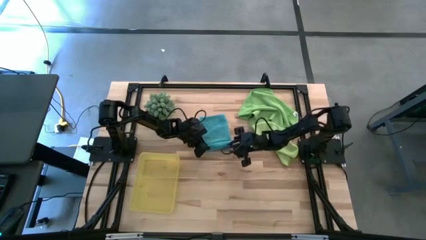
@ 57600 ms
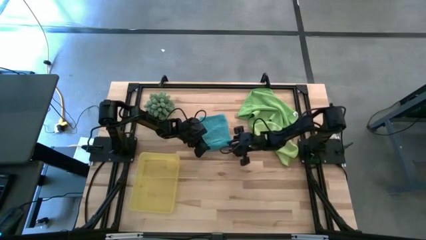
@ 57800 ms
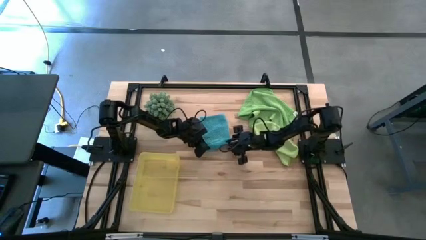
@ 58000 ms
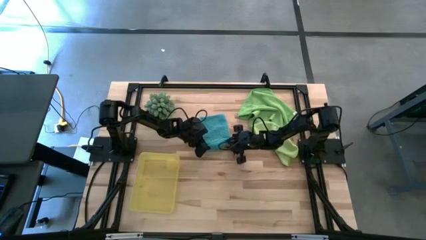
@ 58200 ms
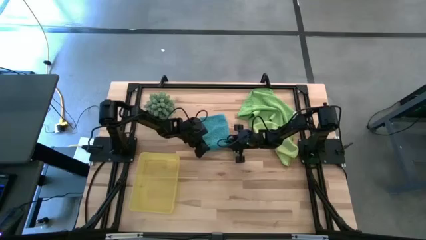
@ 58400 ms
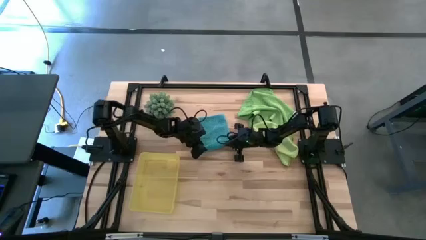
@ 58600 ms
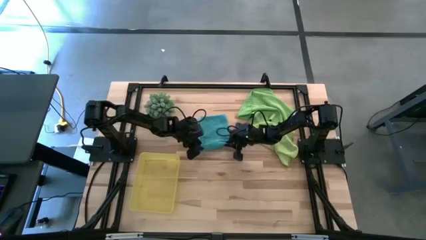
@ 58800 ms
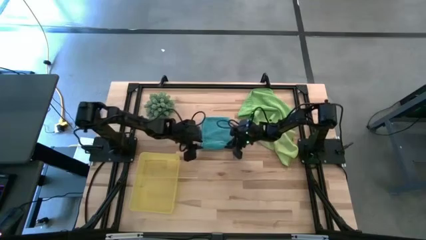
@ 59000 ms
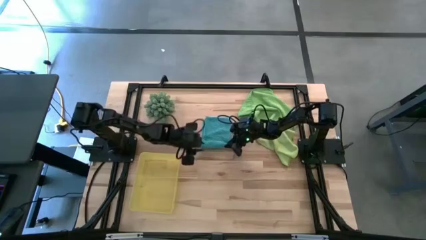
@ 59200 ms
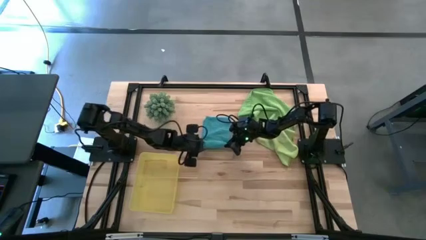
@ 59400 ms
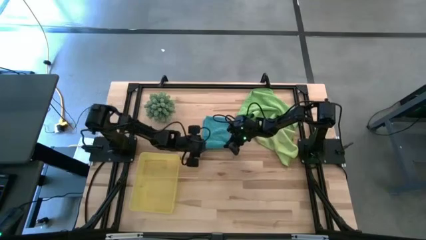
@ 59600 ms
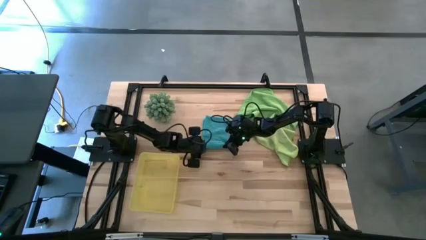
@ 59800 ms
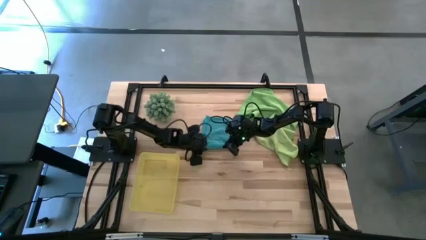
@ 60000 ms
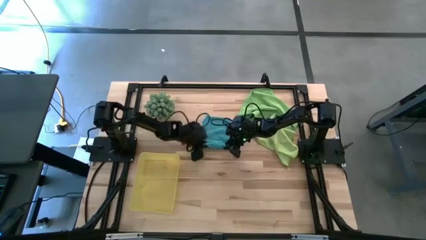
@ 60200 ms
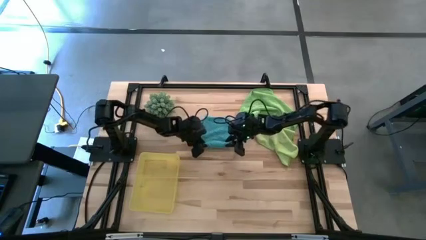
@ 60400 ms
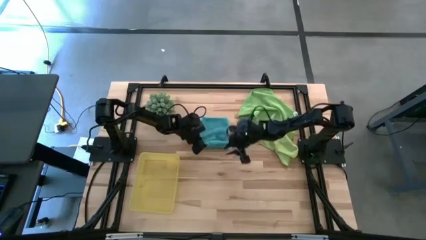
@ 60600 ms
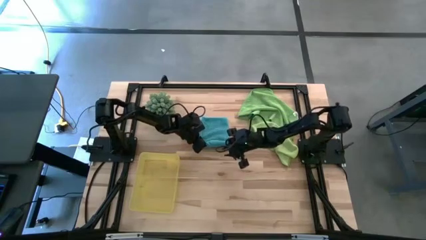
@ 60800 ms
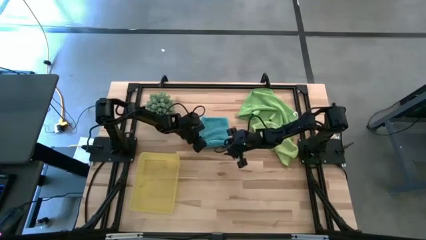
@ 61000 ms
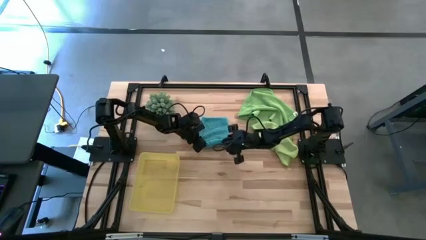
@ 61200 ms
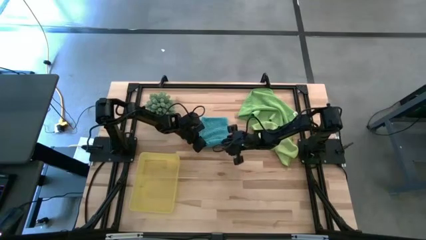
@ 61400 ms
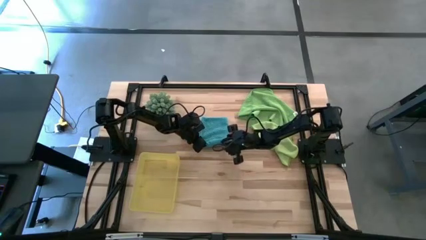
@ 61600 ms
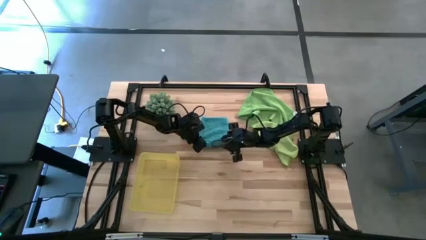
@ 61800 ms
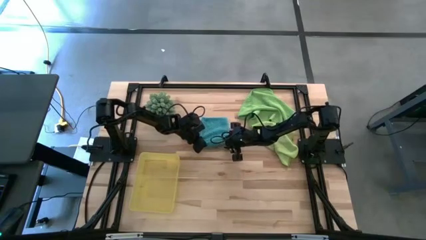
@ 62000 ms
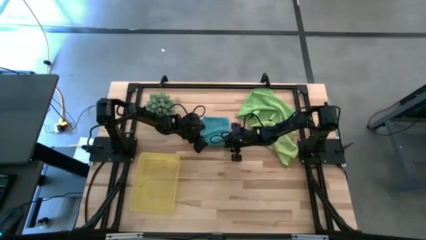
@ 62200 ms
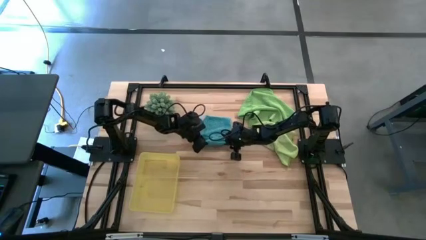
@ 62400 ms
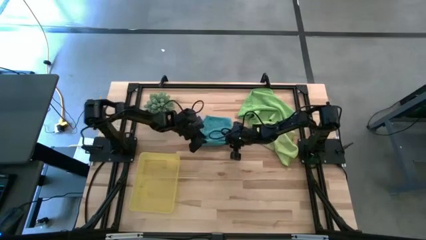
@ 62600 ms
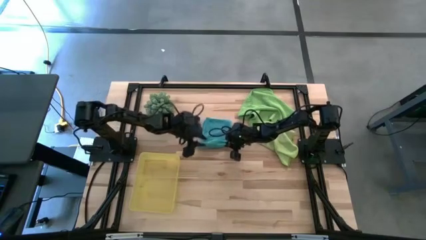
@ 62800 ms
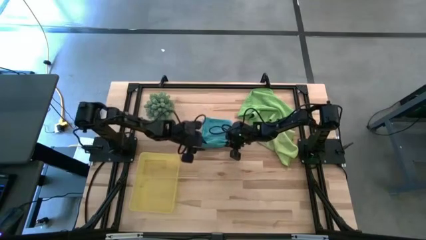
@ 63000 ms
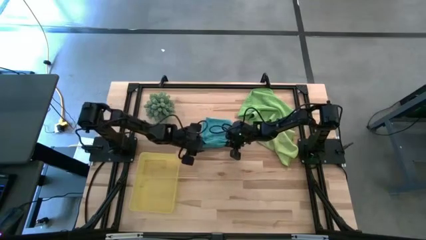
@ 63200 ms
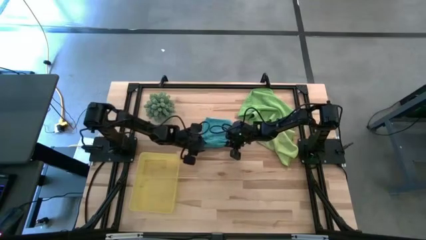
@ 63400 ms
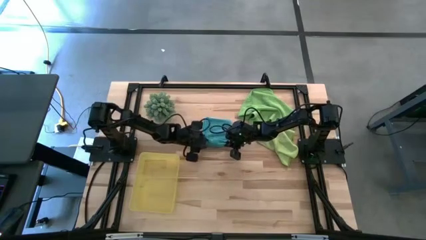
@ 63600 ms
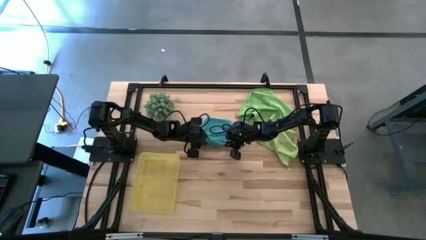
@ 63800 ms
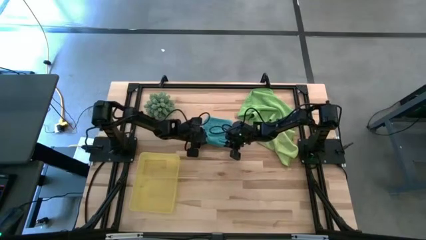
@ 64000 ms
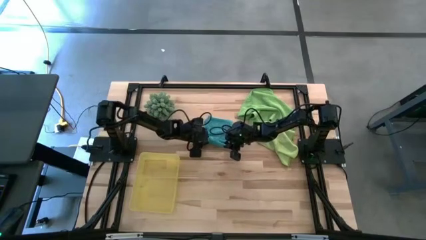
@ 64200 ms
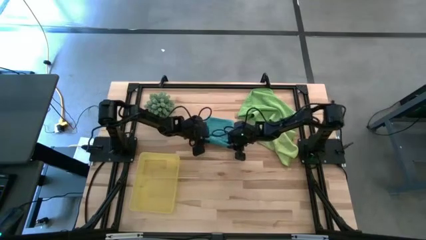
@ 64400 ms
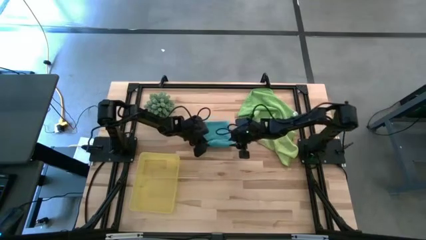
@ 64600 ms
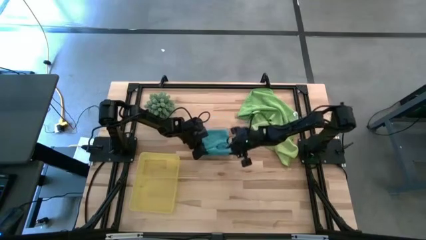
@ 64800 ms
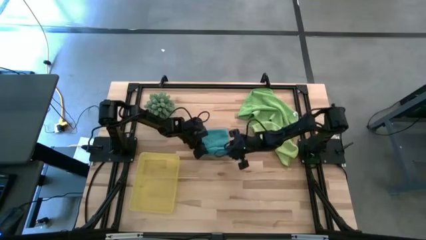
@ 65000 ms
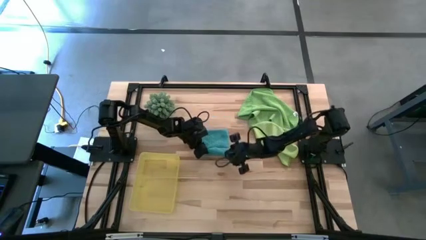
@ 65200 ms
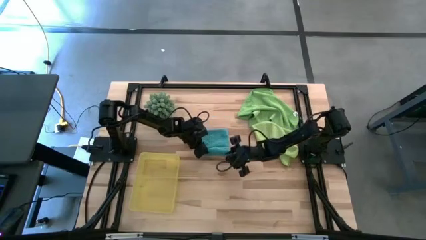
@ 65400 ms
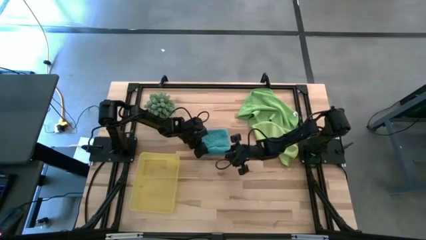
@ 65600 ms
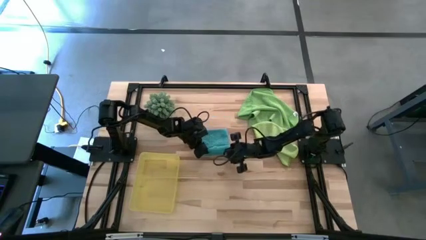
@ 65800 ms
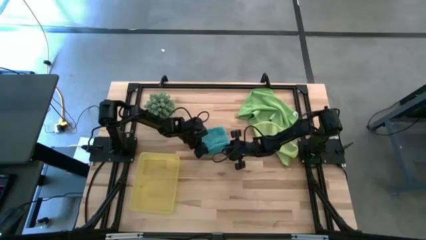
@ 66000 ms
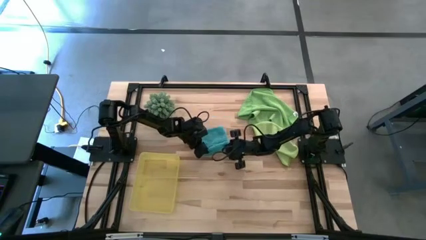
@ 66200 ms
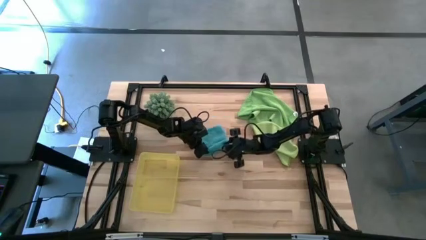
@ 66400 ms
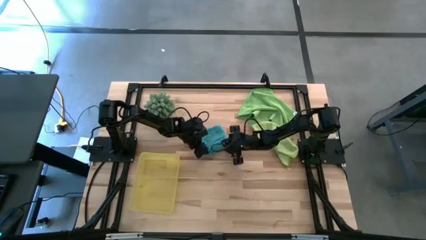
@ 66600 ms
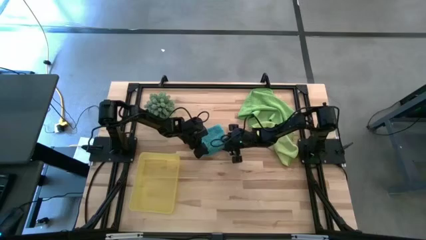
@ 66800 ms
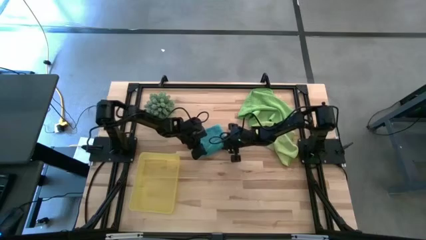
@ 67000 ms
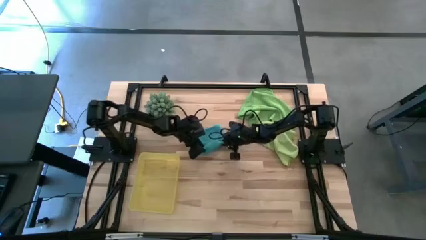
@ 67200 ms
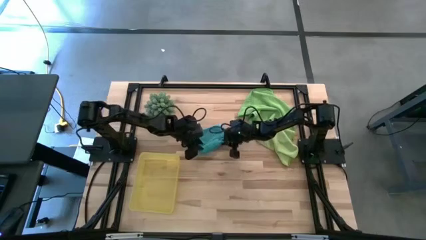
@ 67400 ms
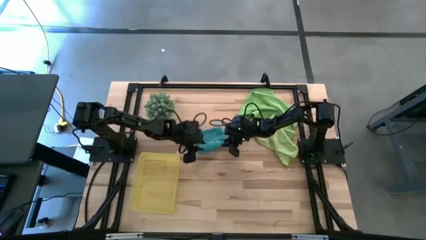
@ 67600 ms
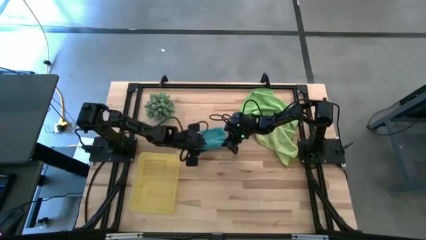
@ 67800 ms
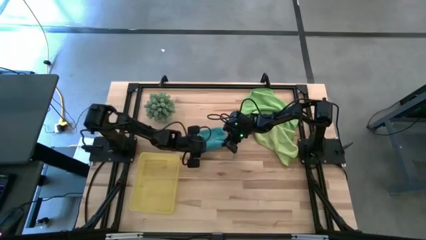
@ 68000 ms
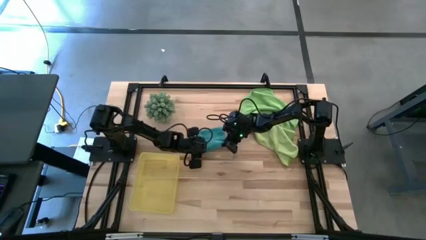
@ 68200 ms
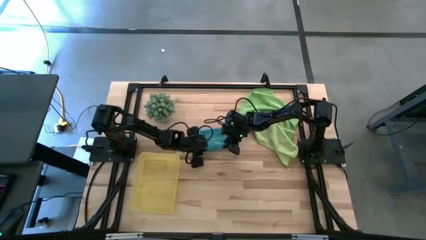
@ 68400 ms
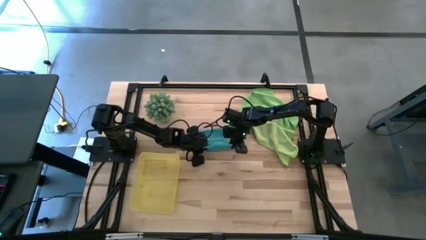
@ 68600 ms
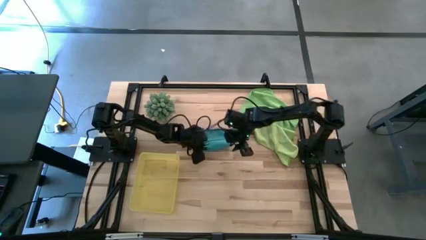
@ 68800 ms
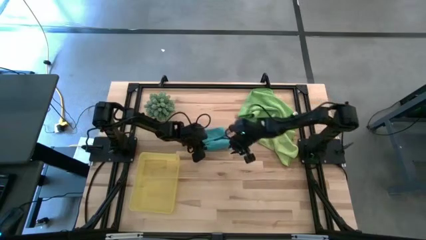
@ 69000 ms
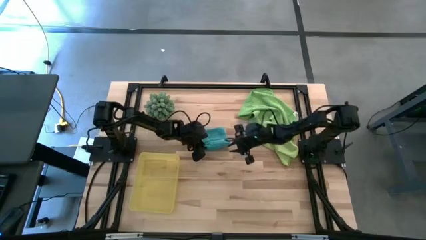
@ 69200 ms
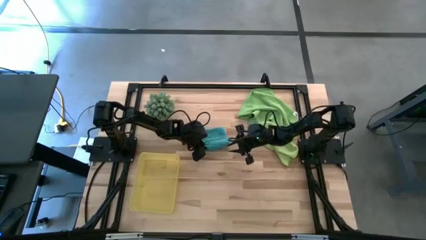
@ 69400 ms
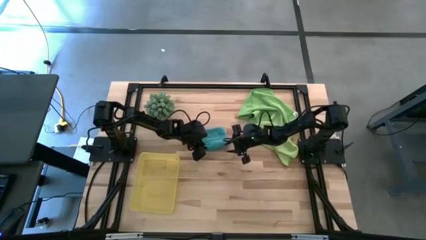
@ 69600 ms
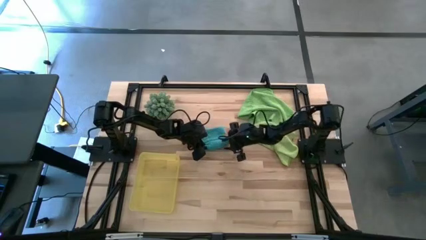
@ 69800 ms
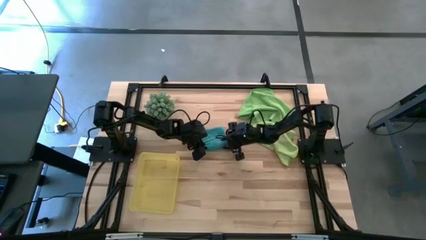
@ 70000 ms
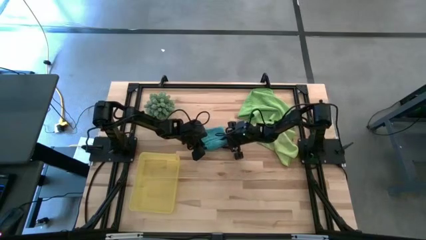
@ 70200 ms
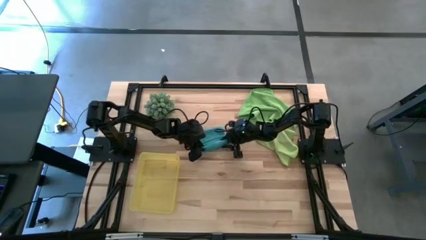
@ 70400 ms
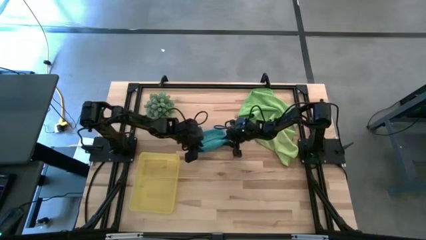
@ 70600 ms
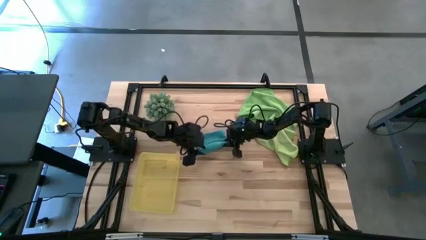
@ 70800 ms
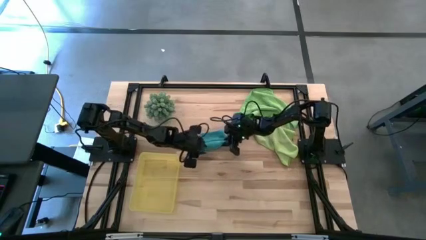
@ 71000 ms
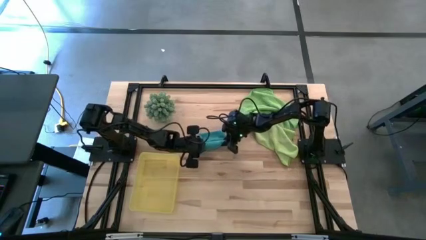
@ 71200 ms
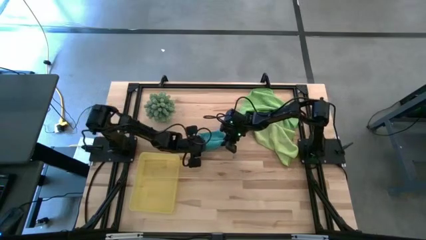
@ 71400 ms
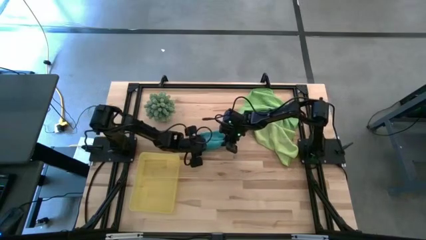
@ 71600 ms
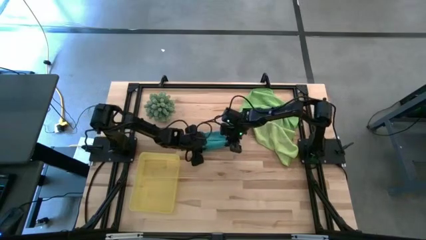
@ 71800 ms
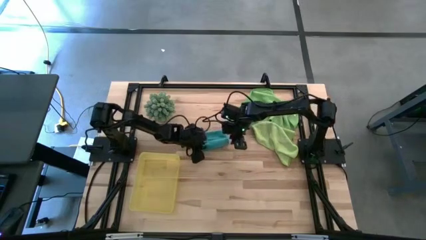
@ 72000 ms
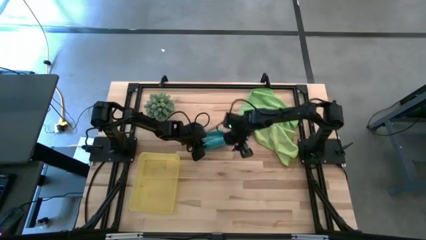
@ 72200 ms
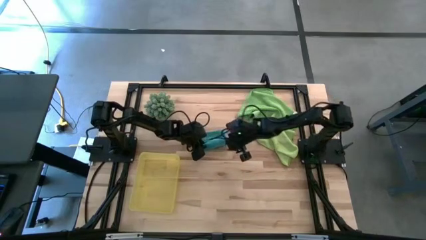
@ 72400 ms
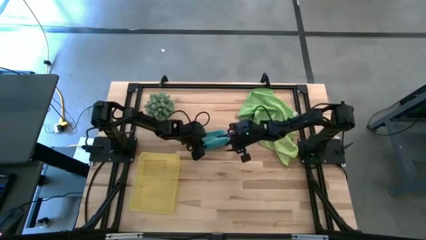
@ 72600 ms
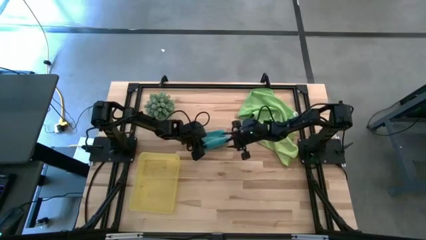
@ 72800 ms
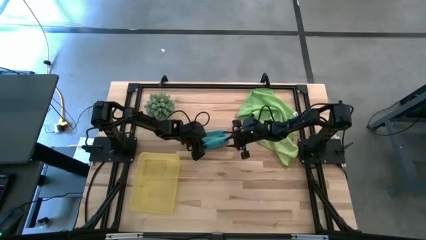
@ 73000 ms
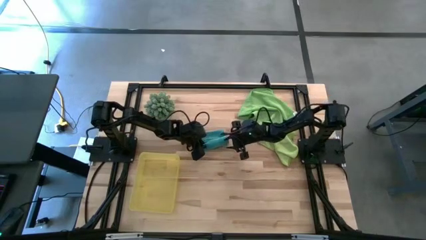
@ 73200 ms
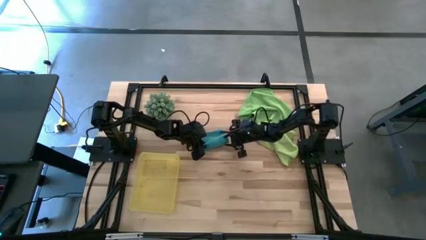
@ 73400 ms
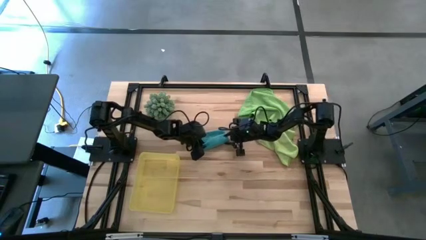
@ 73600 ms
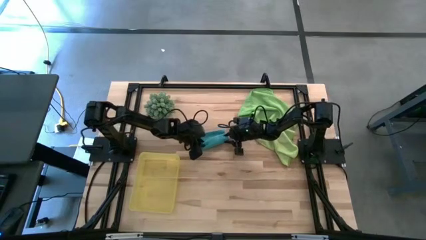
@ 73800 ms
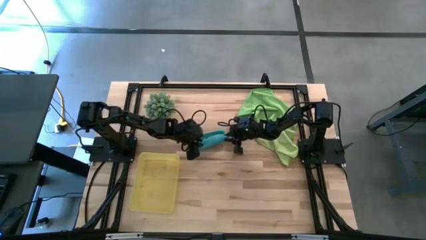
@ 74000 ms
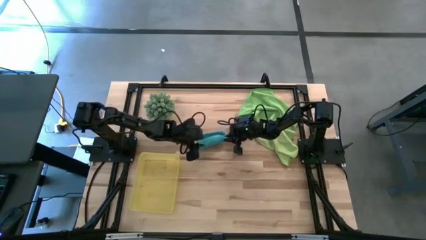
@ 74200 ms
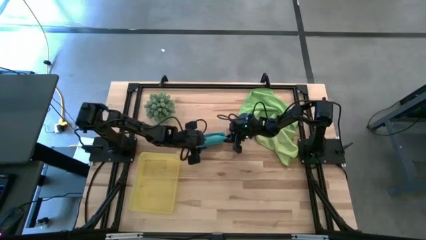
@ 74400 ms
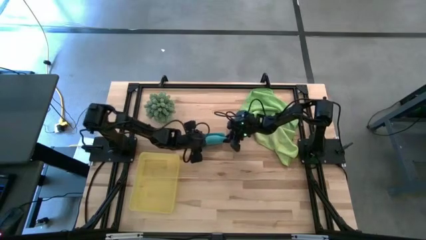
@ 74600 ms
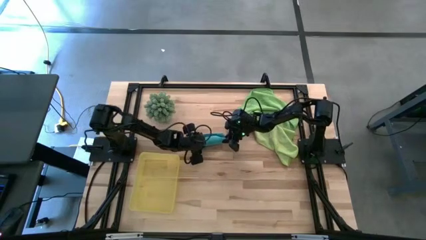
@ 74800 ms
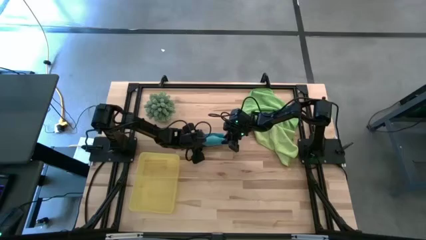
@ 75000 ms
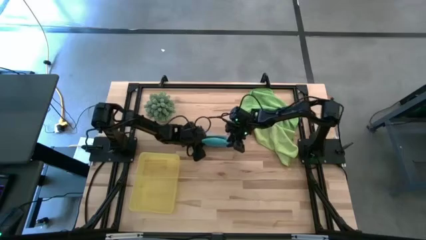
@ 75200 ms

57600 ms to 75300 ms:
Task: Roll microfiber towels into tight, uniform cylinder then place into a basket
Roll the blue towel
